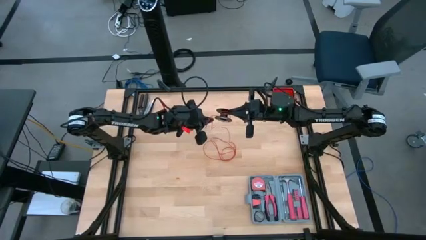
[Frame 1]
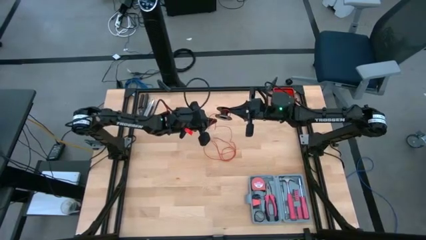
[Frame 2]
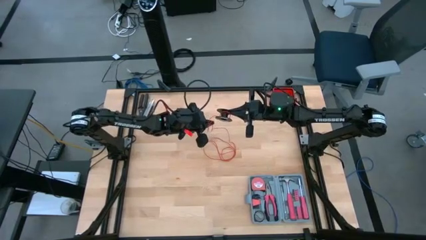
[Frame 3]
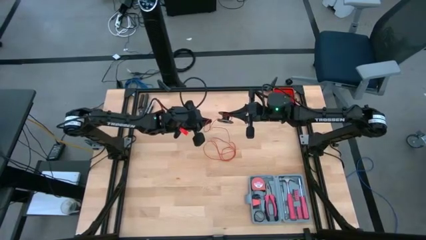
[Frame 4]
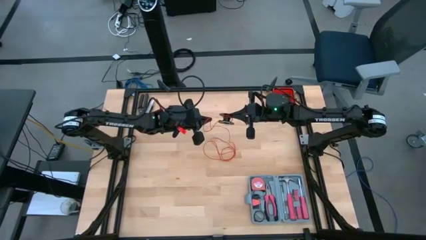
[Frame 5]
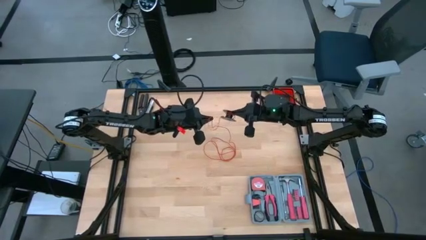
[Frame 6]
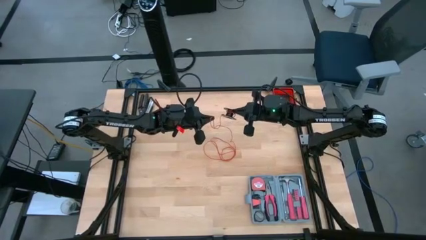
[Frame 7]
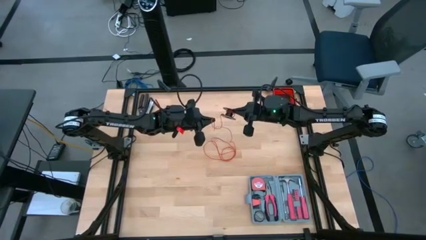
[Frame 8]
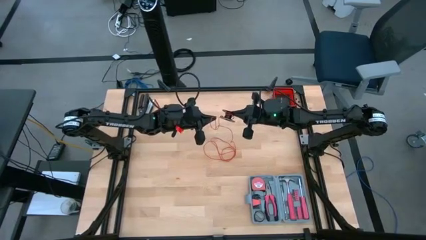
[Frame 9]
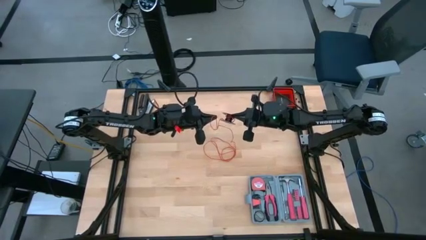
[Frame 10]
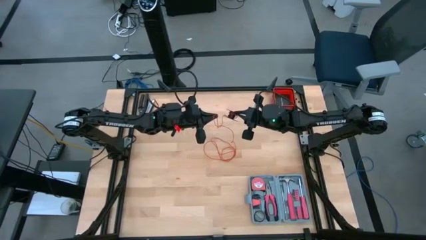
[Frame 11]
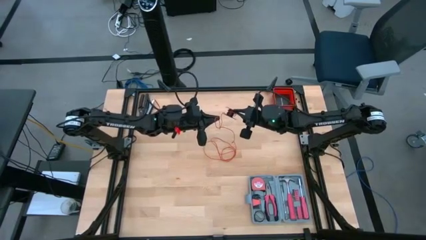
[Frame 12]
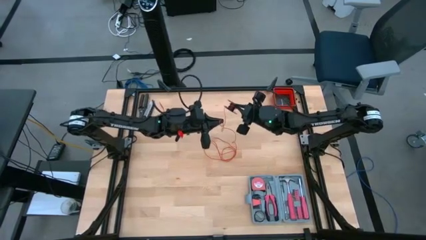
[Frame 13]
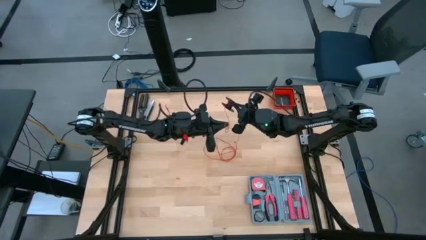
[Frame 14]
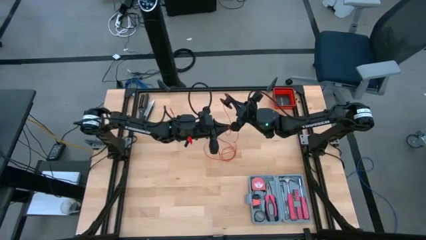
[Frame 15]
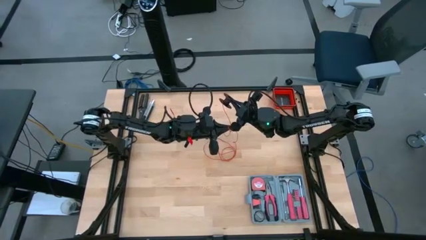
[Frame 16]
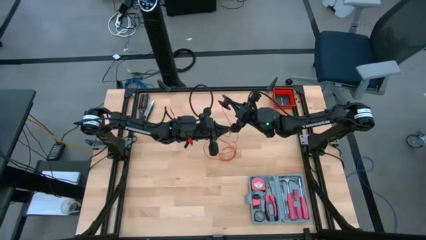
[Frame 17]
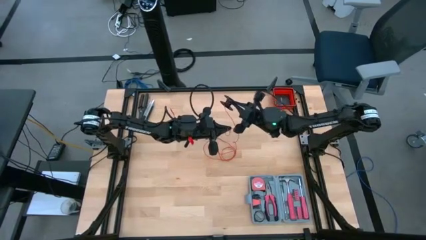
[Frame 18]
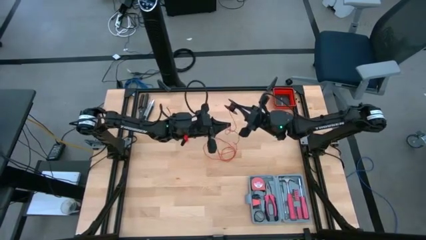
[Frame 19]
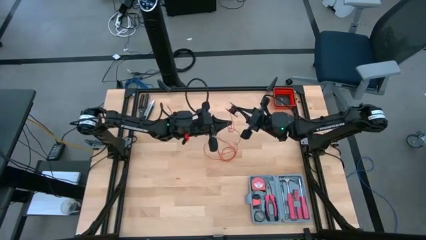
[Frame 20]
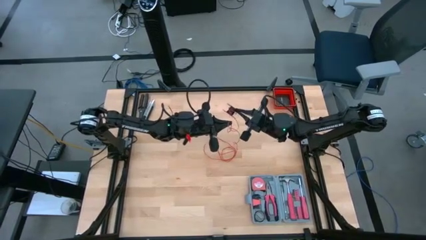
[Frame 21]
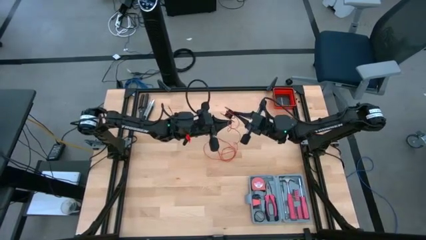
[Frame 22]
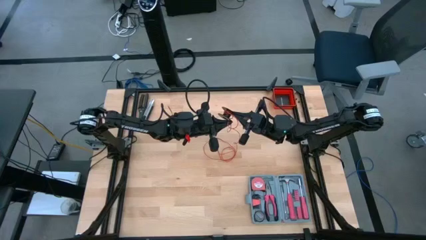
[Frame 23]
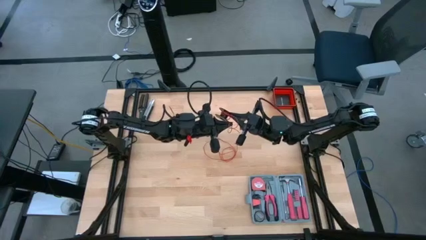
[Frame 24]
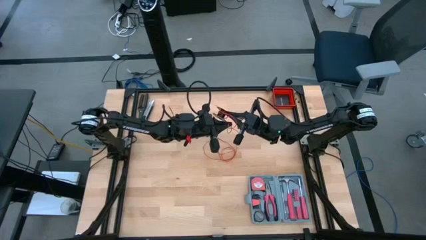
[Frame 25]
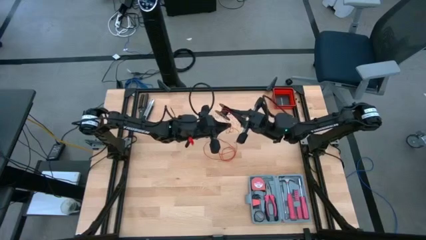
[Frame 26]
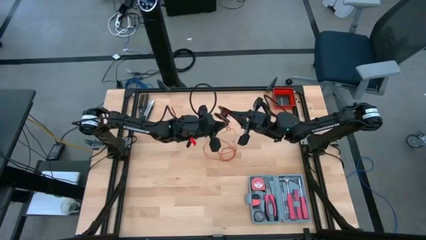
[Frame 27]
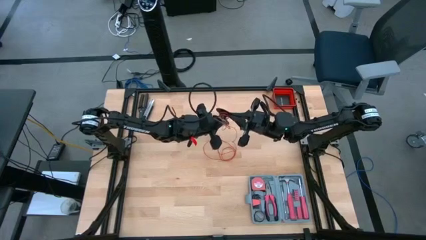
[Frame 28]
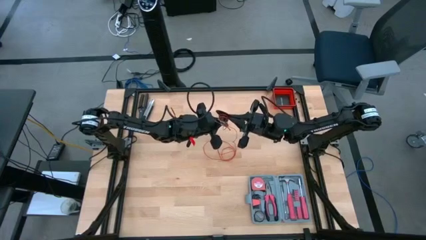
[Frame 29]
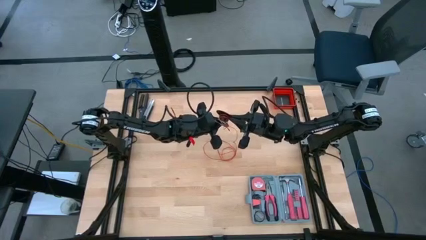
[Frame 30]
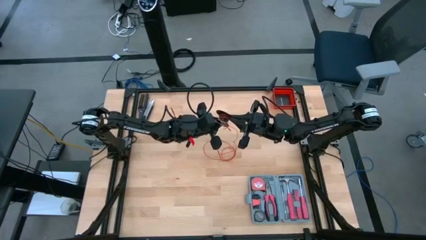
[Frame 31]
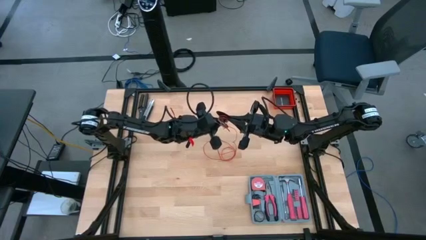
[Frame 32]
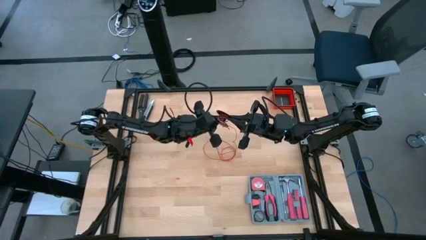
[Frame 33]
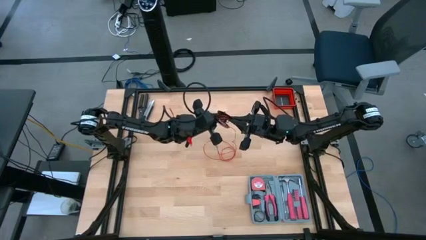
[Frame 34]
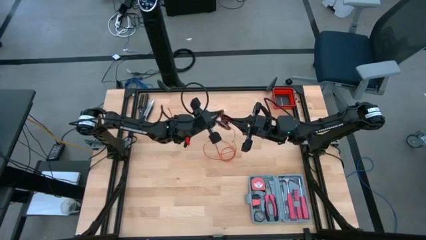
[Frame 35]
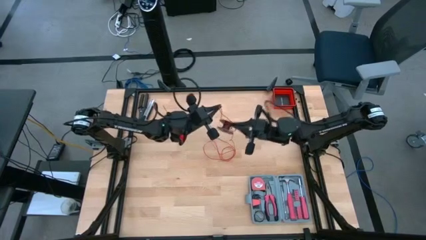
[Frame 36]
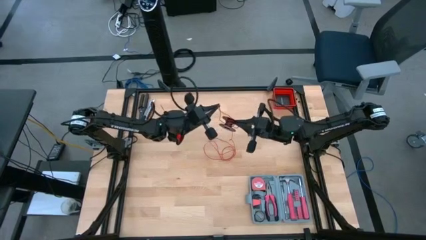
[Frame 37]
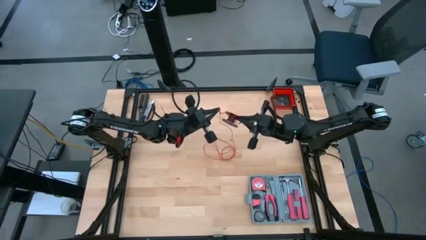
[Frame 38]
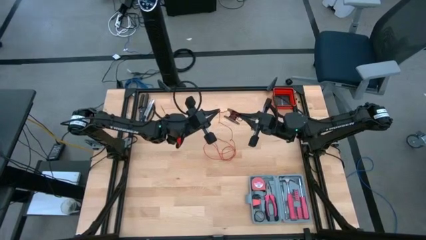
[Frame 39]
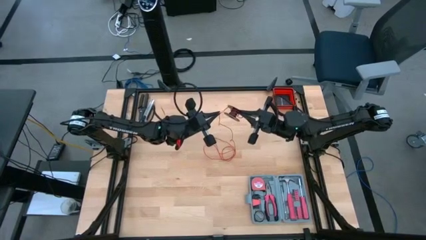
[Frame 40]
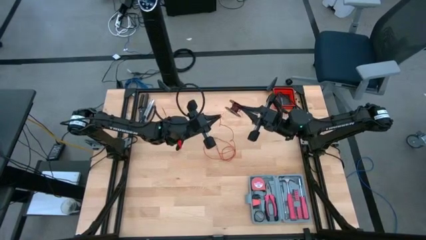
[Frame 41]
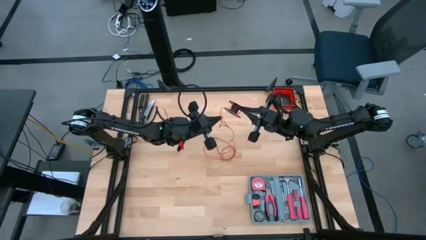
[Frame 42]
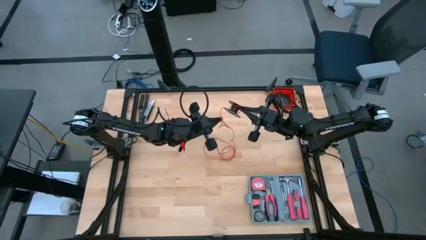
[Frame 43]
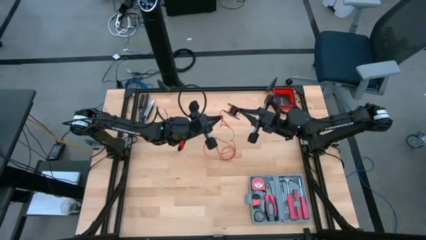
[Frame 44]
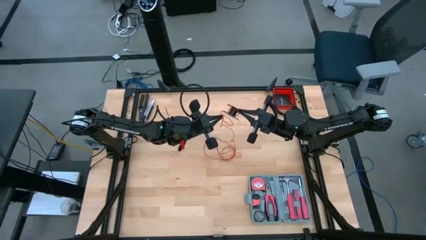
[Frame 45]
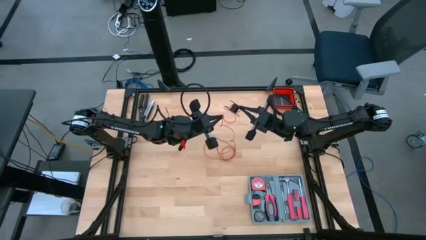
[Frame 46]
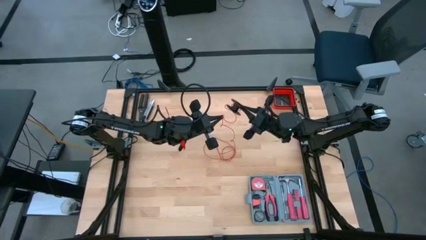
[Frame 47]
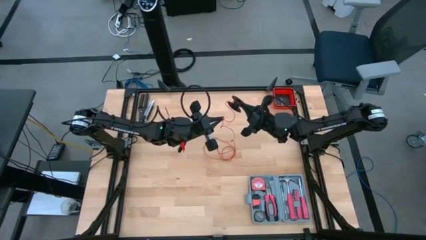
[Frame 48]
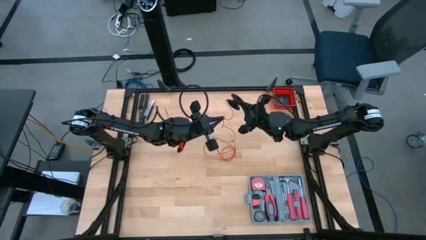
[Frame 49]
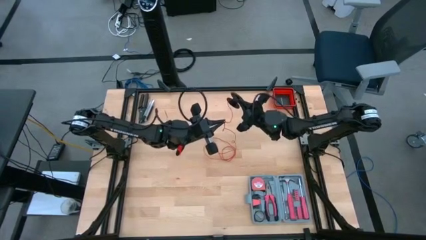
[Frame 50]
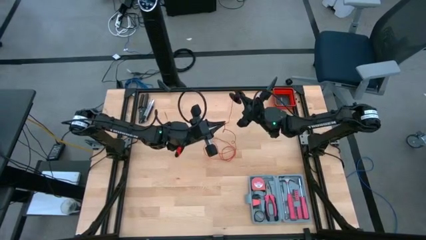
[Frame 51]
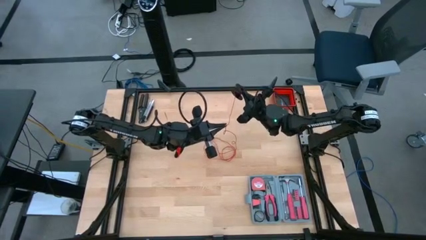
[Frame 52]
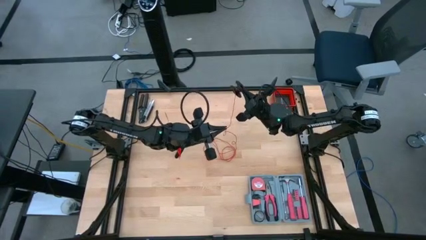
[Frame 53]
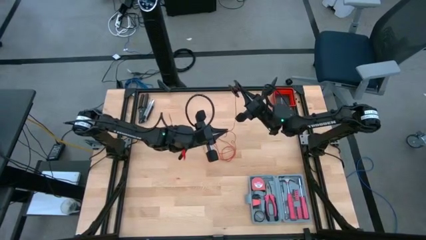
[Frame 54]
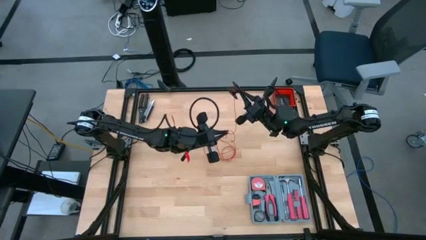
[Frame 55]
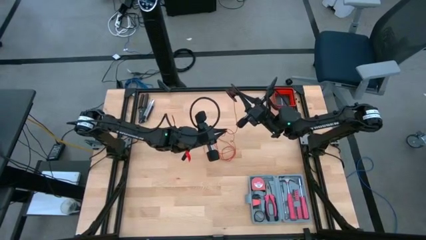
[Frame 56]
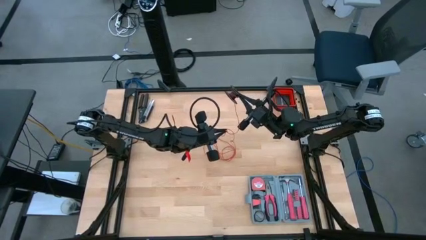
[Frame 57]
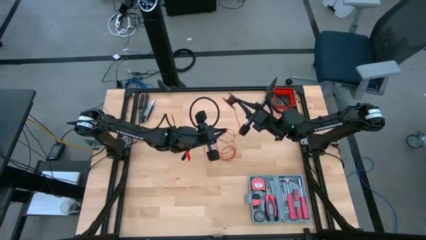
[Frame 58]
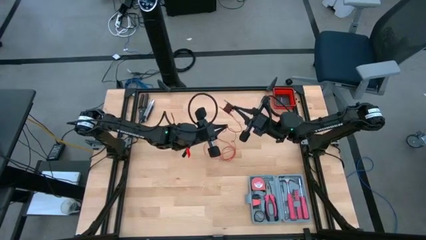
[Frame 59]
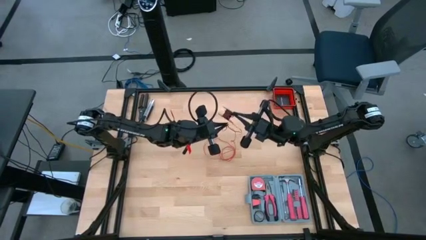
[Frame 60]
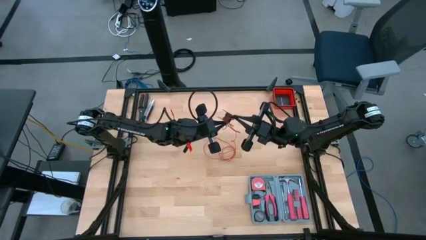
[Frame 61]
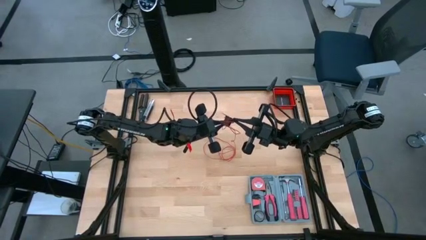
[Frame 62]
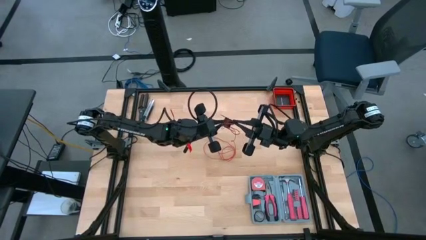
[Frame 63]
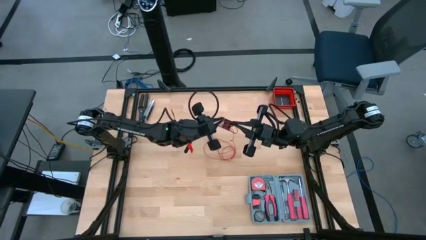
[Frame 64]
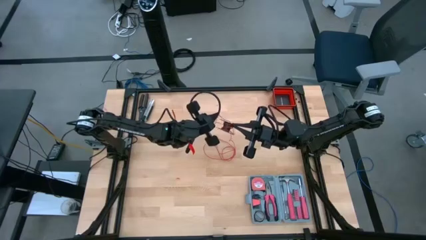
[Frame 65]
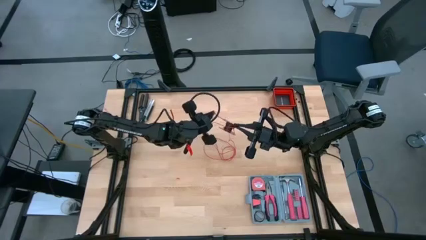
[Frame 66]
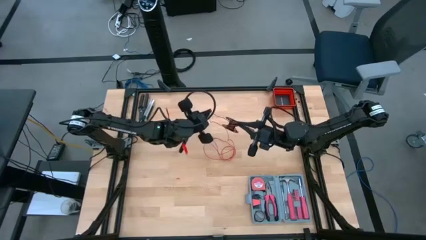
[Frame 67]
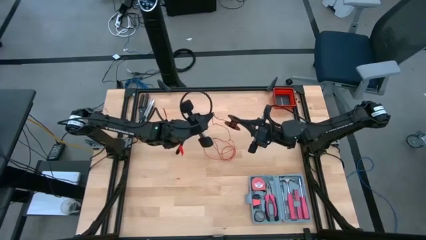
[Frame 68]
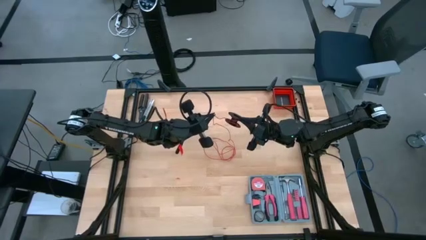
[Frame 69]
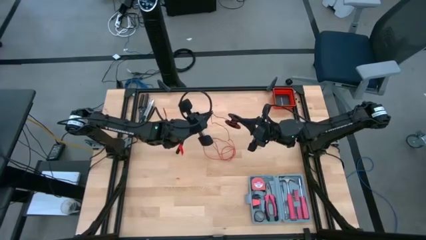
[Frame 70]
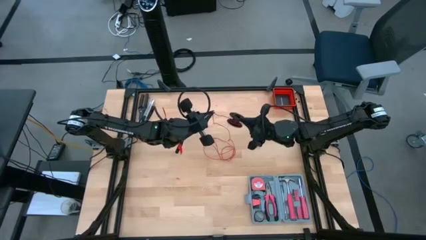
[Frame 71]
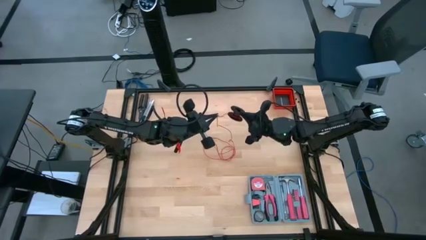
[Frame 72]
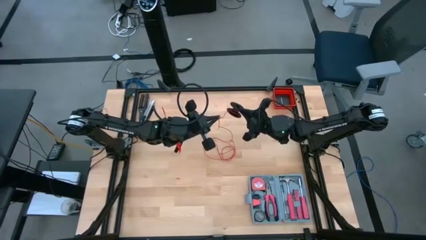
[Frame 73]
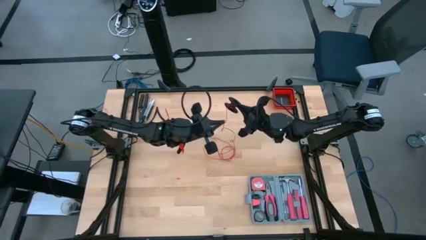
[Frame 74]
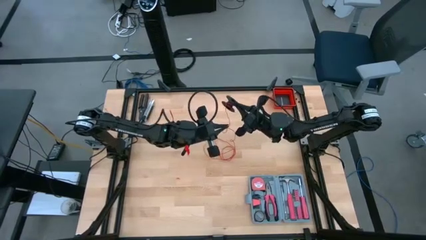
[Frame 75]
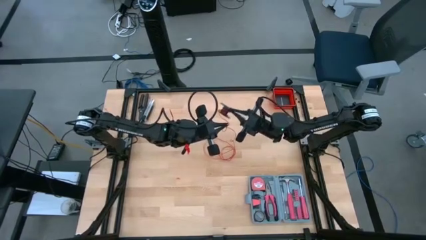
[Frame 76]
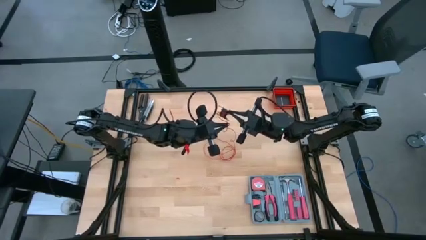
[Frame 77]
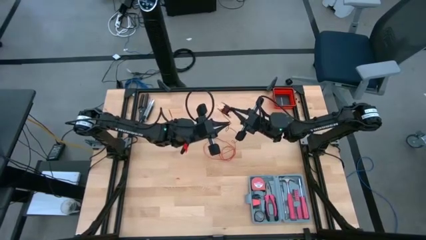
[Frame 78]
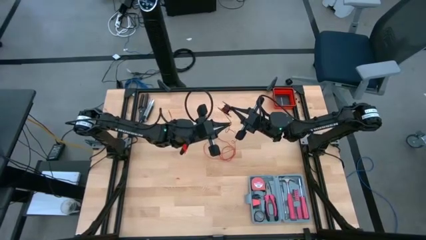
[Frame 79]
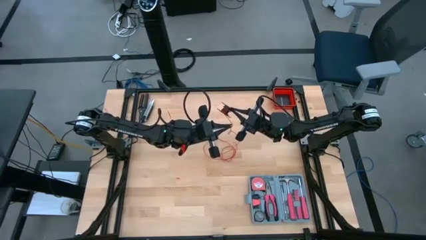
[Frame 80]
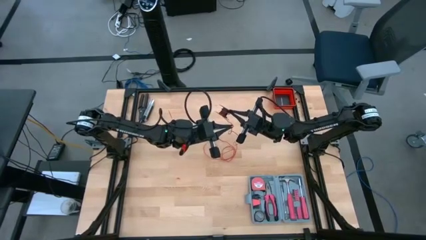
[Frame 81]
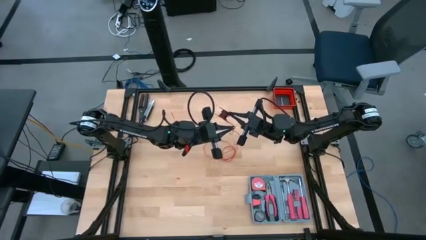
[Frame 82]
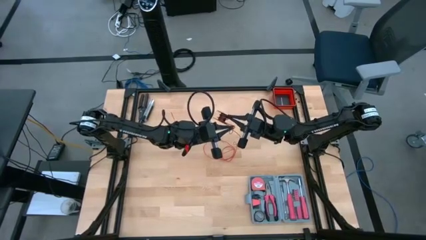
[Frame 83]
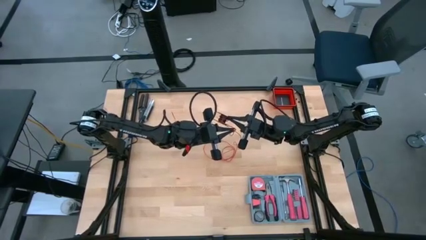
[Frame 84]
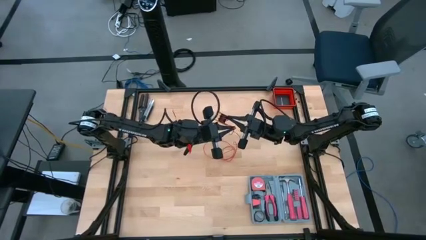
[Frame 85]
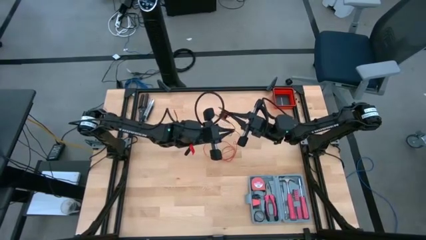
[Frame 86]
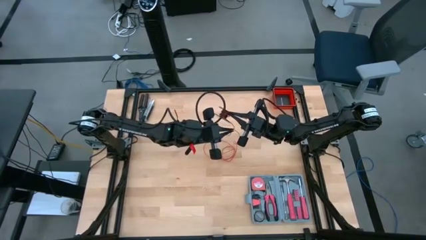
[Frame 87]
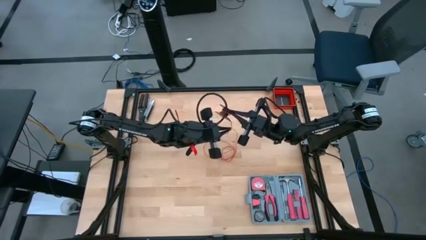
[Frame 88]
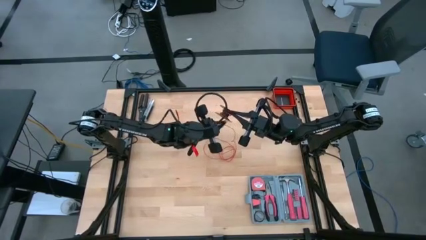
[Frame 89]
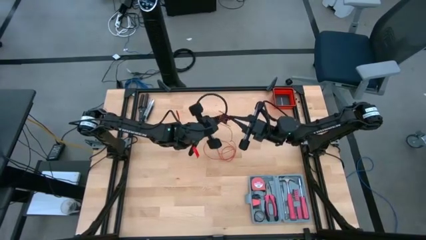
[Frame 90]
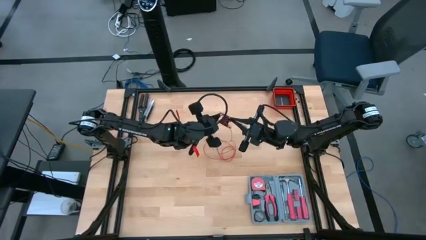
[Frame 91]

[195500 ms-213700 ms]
Task: Coil cords
Coil the wire
